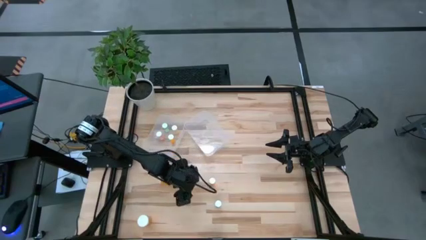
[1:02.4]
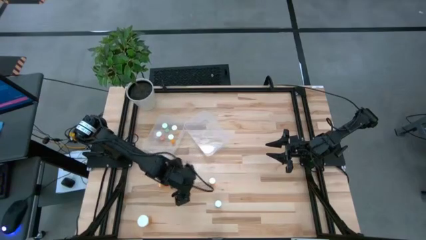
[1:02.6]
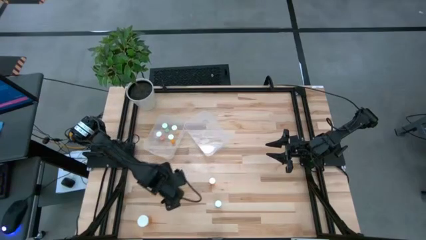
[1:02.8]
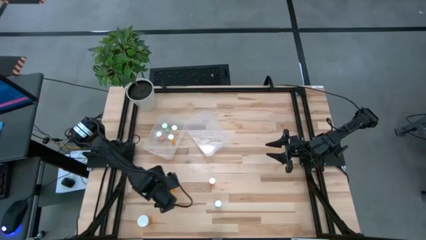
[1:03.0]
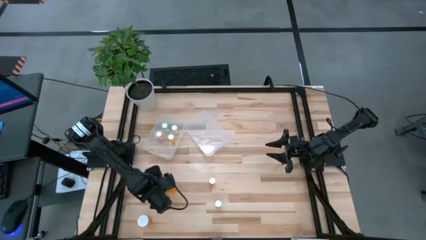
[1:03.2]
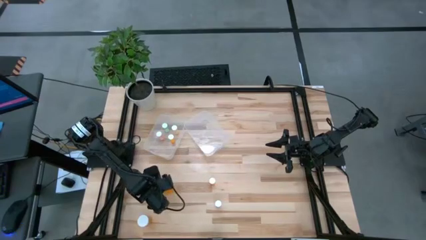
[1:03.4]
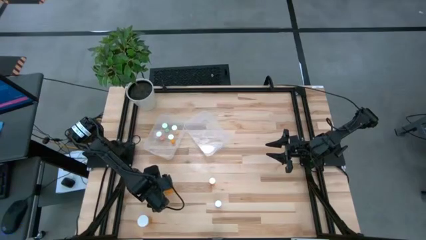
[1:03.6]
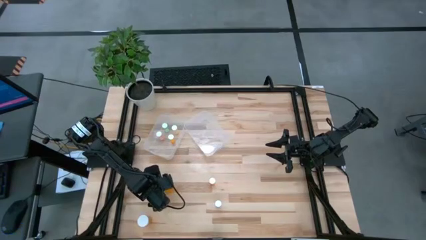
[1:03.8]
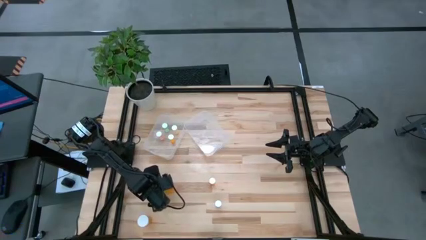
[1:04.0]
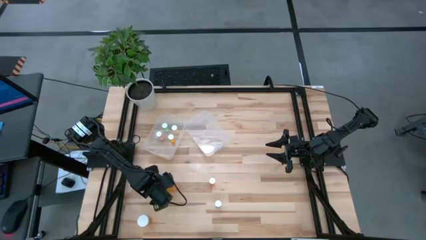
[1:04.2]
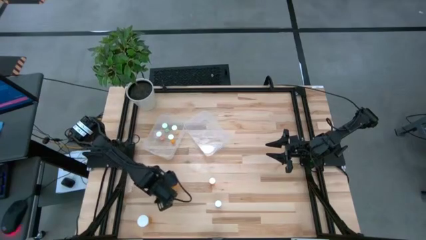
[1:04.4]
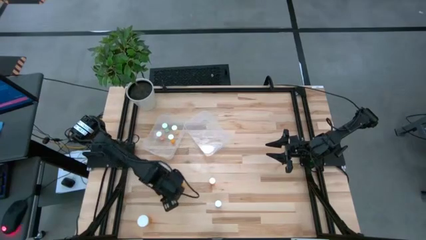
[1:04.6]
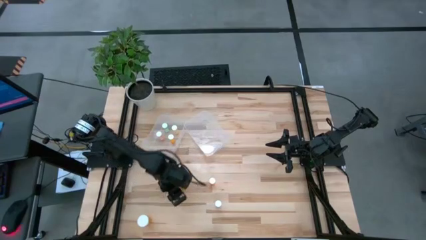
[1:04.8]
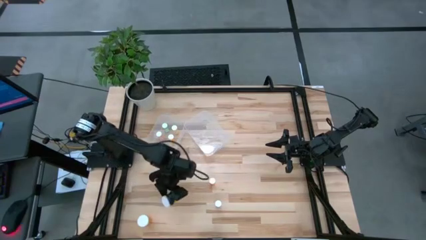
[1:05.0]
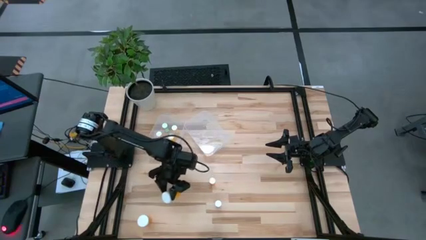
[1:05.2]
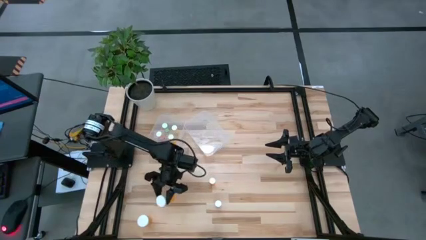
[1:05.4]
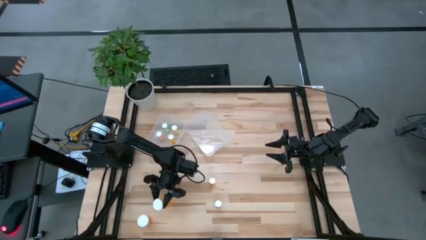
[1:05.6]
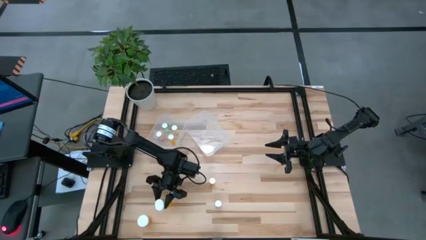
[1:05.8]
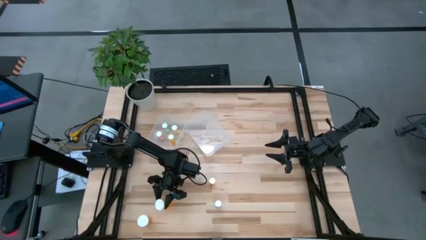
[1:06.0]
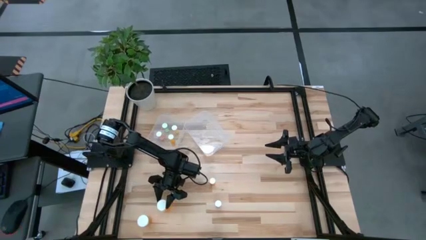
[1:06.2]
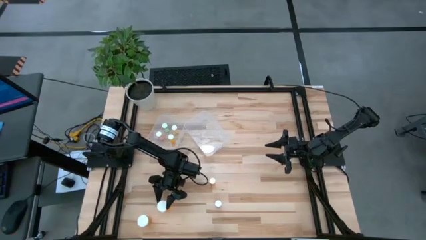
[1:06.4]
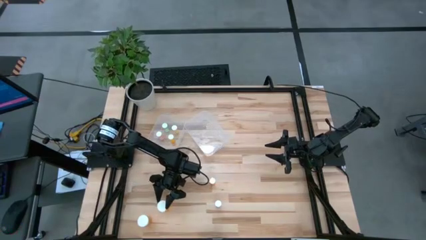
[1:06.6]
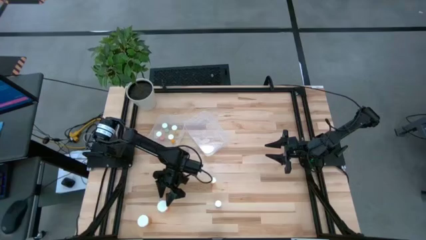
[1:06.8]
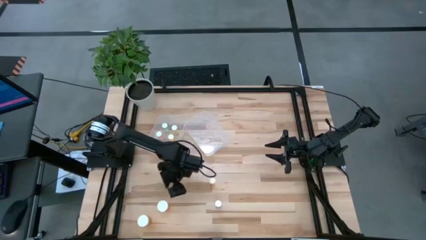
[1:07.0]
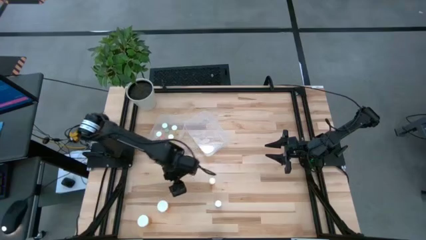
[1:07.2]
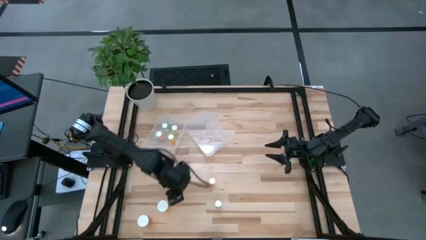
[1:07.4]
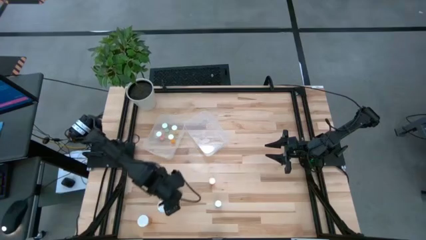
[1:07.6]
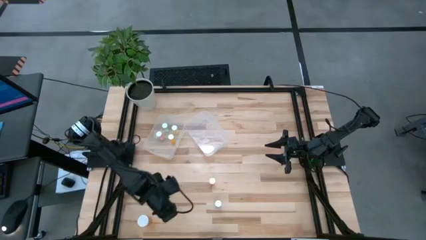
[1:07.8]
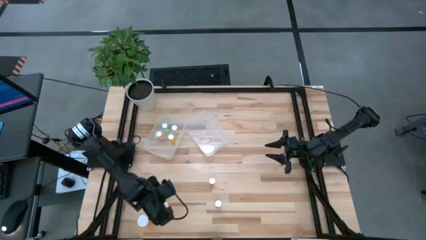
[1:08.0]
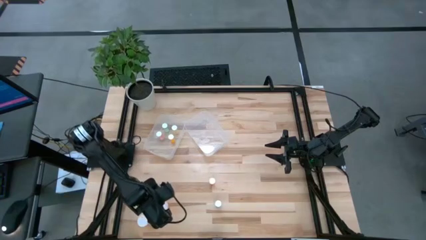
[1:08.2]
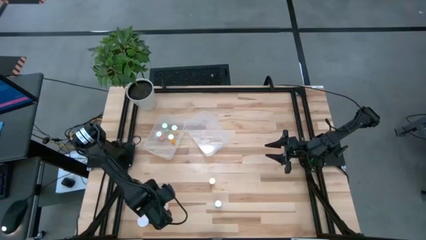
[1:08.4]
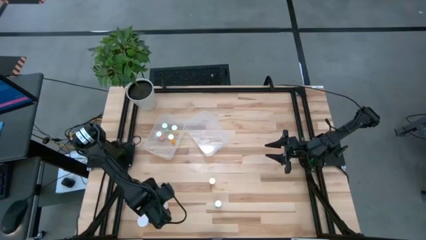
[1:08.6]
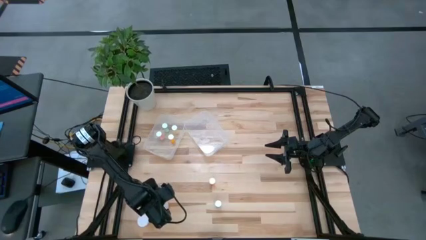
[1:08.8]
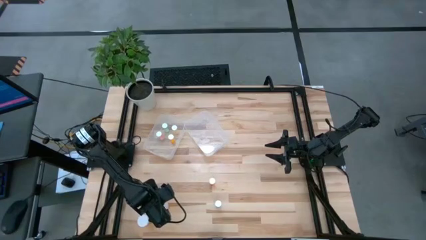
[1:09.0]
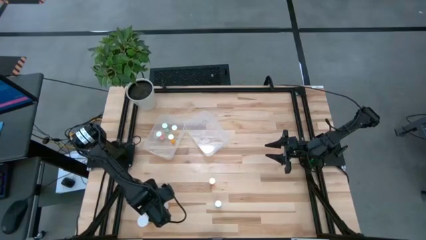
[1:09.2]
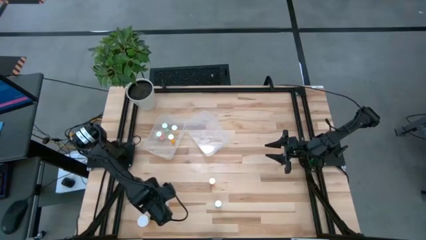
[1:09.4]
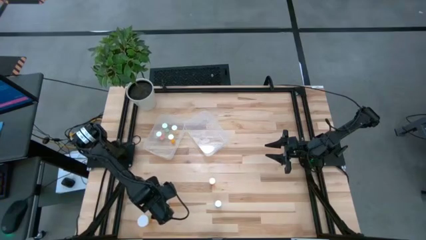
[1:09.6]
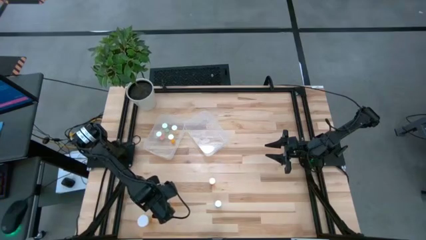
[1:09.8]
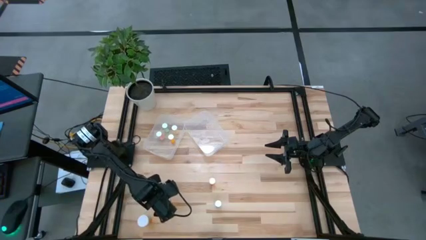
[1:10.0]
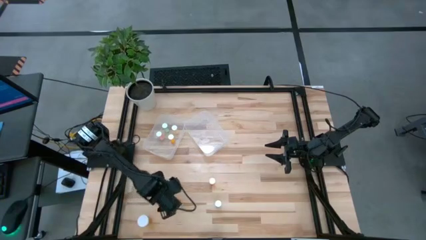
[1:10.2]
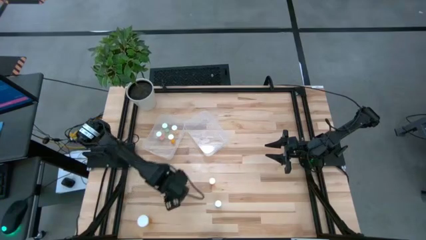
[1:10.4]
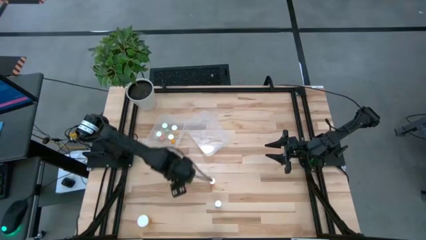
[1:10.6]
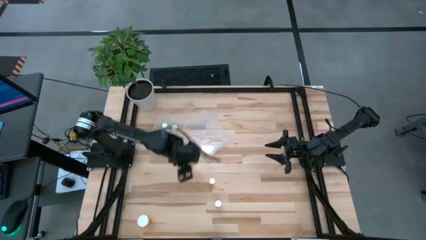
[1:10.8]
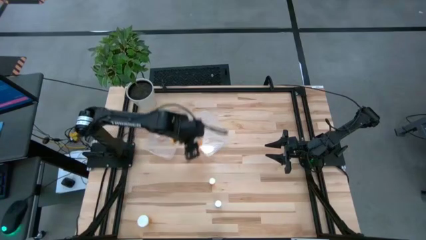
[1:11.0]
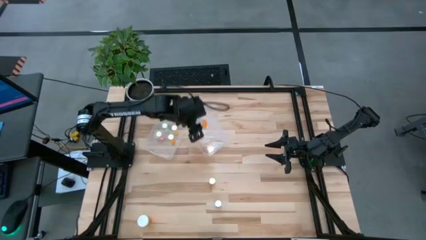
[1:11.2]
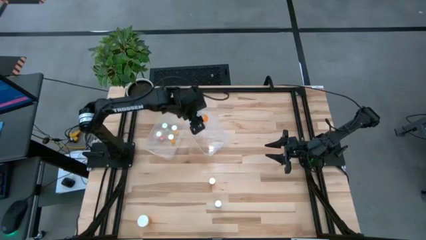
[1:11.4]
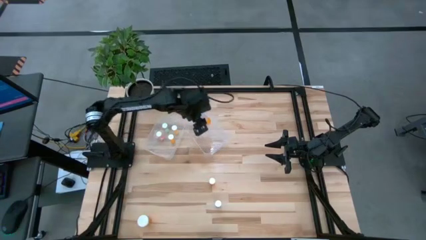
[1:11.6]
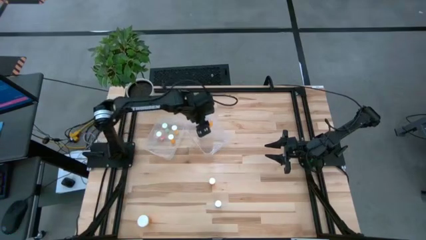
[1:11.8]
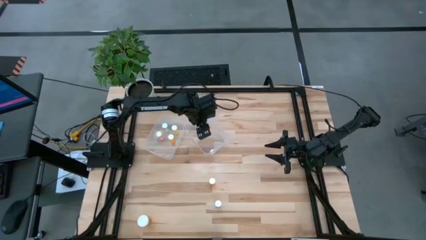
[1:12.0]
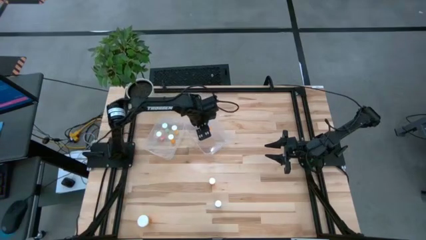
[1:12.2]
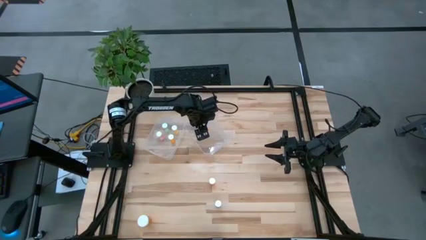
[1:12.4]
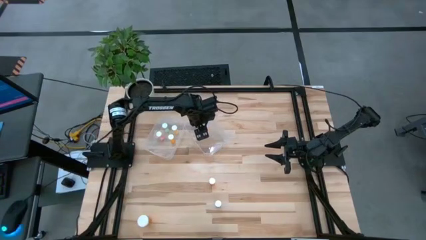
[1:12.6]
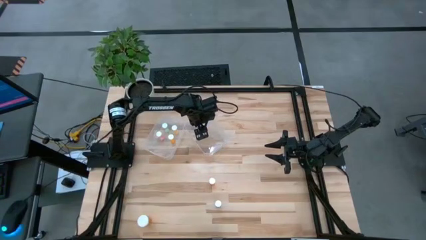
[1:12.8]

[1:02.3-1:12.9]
Task: Pick and place medicine bottles into bin by pill shape (circle, oval)
Put the orange capsule bottle into the right transparent bin

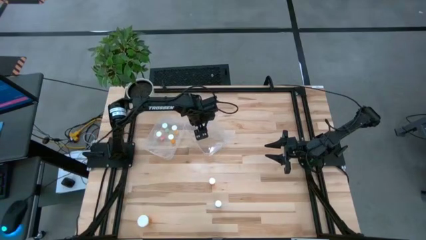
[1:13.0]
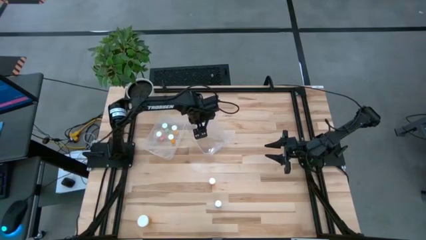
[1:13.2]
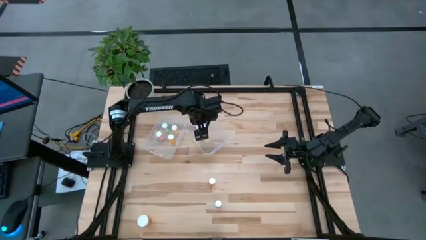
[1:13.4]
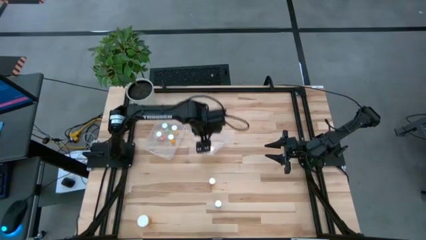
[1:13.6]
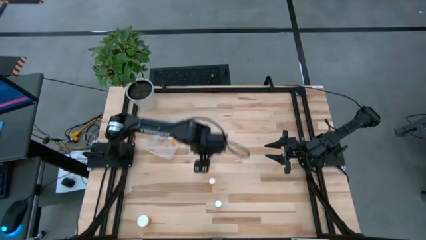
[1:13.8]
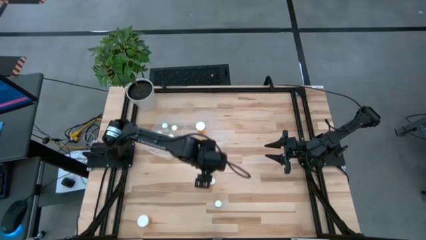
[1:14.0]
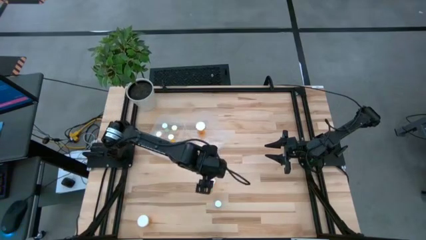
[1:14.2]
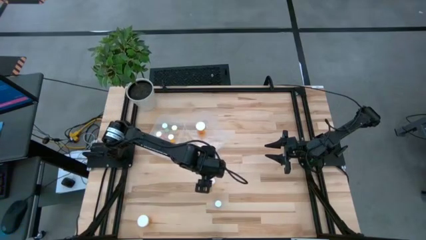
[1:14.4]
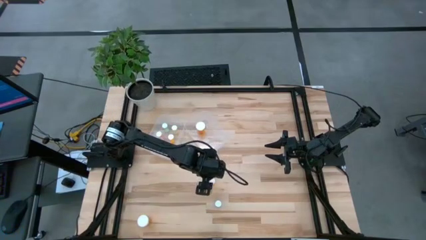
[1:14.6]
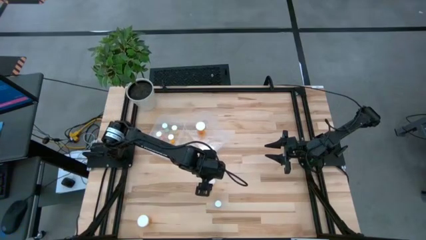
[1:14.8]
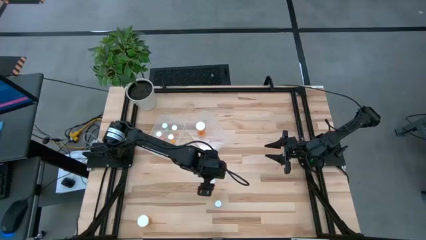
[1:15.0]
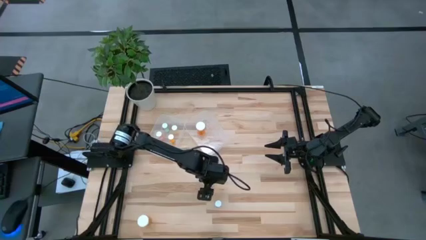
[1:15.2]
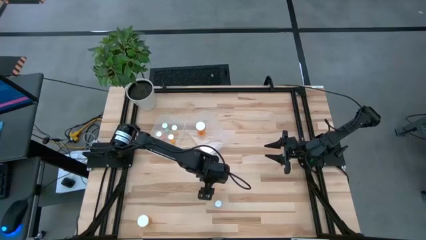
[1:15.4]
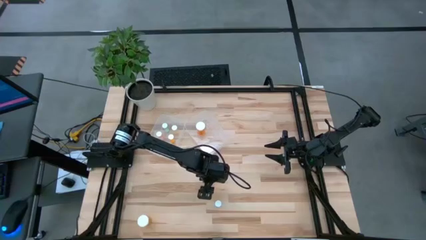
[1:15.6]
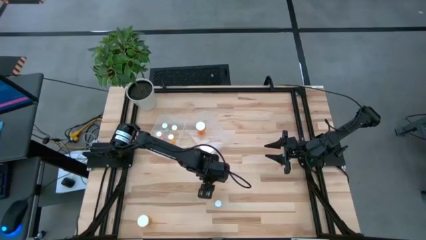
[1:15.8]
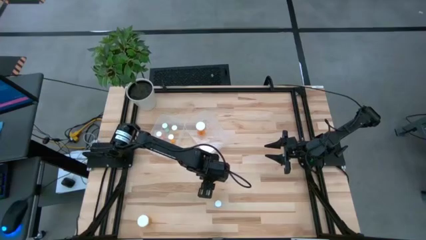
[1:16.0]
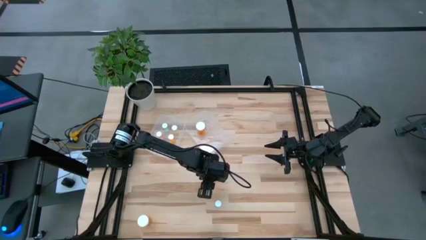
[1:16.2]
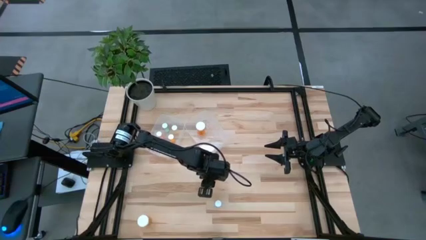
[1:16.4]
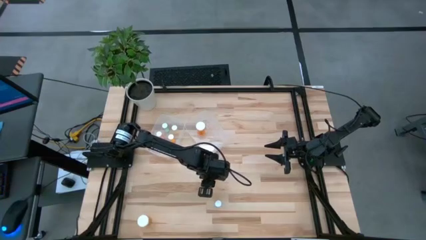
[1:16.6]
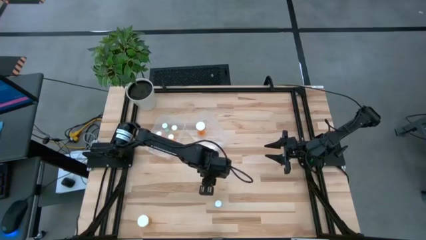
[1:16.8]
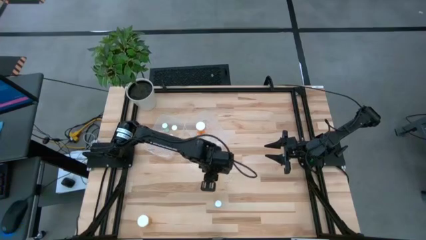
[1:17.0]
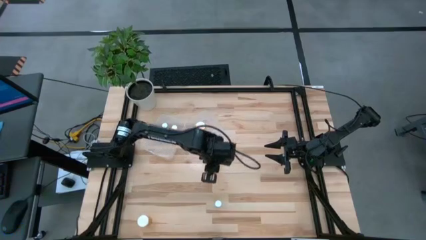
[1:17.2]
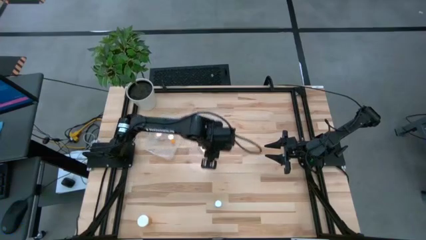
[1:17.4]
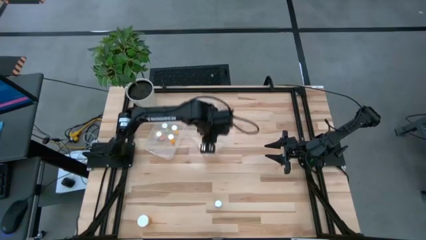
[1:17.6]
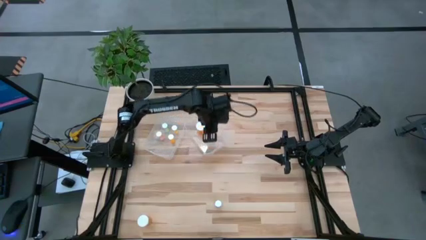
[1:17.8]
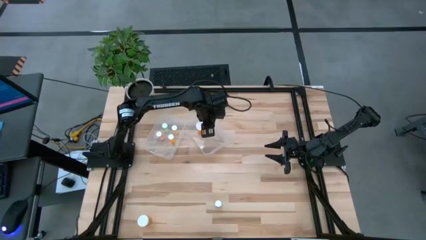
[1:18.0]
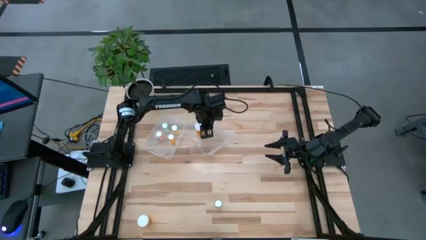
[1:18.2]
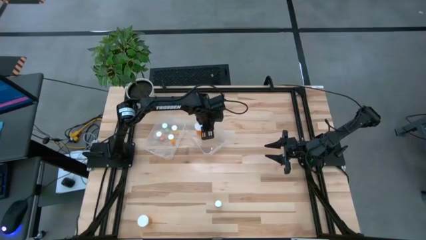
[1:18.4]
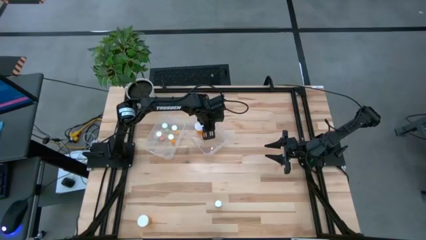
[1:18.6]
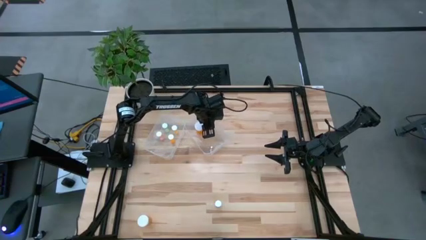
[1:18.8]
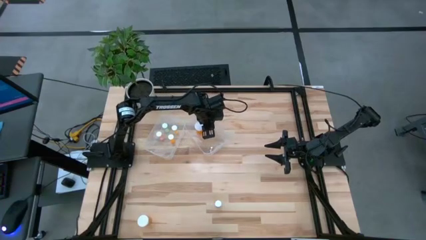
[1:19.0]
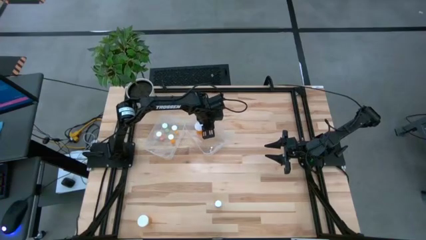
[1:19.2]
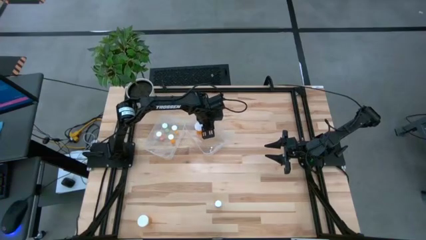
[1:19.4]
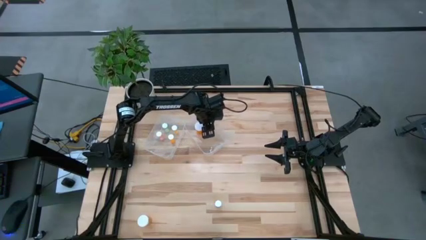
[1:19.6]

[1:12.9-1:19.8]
Put the orange capsule bottle into the right transparent bin
